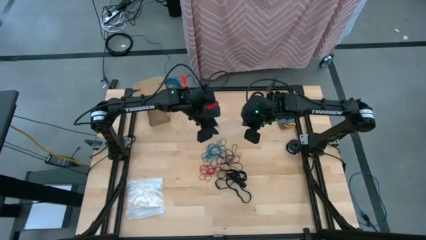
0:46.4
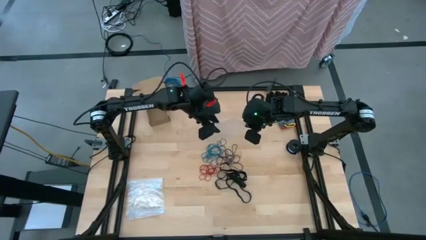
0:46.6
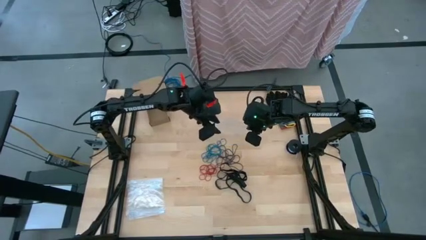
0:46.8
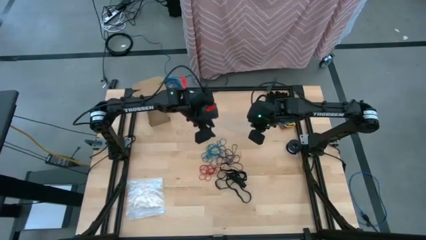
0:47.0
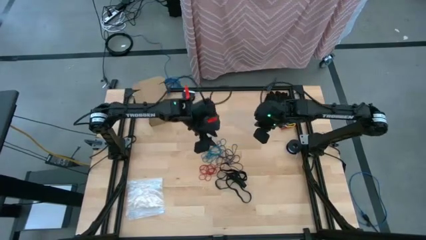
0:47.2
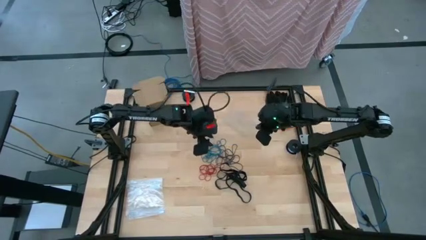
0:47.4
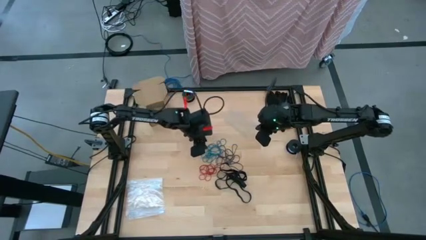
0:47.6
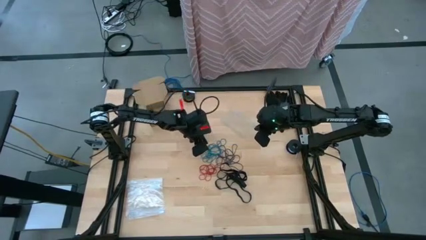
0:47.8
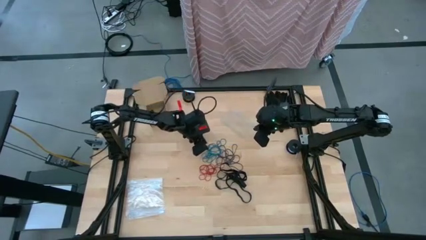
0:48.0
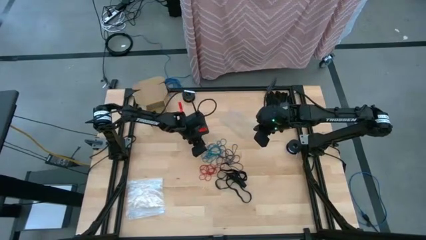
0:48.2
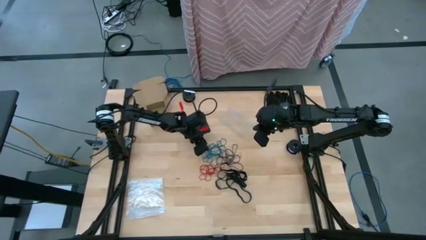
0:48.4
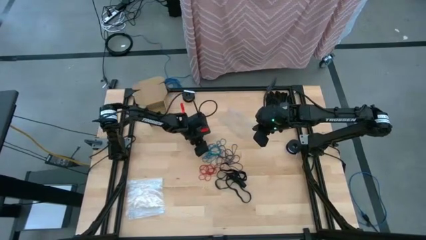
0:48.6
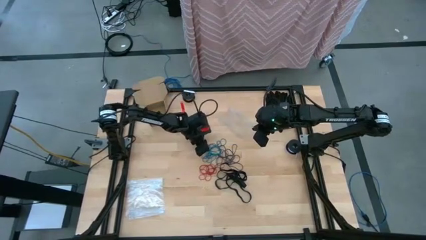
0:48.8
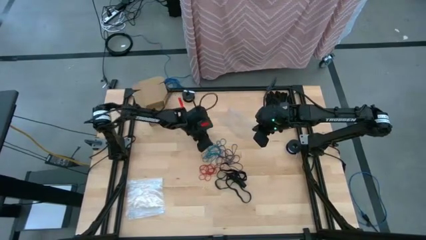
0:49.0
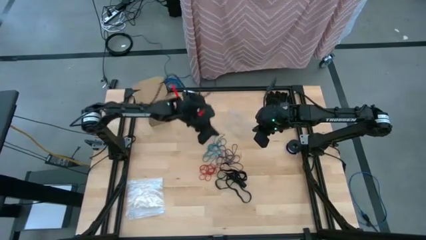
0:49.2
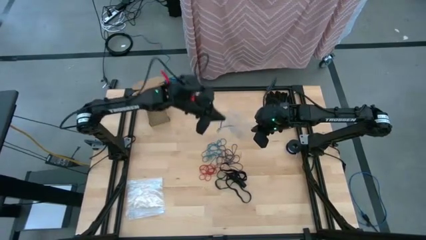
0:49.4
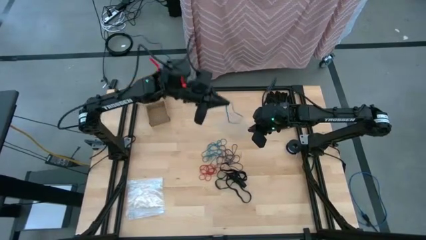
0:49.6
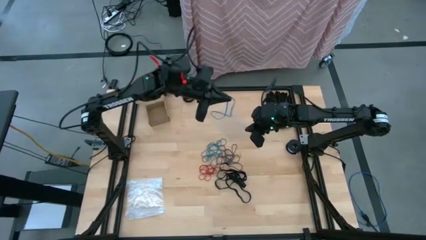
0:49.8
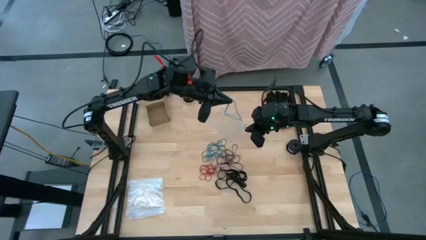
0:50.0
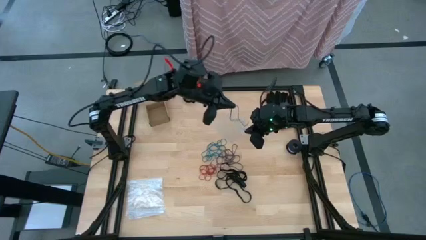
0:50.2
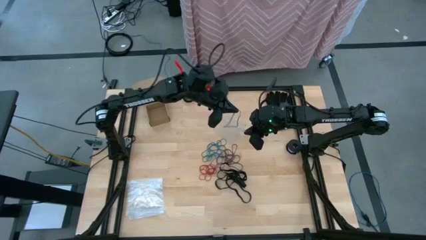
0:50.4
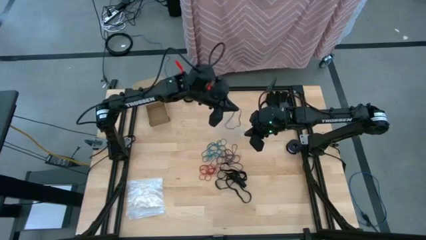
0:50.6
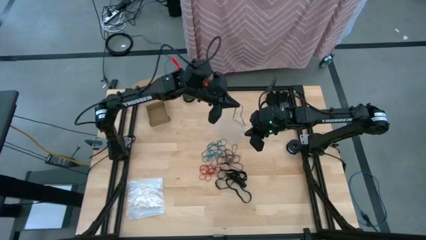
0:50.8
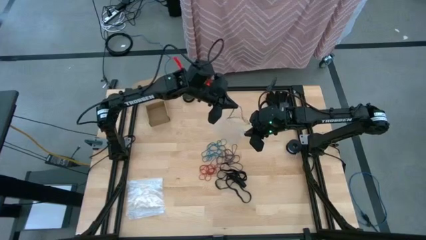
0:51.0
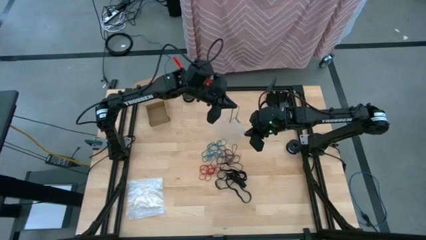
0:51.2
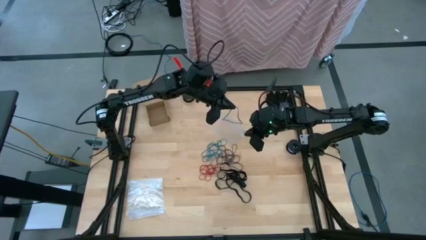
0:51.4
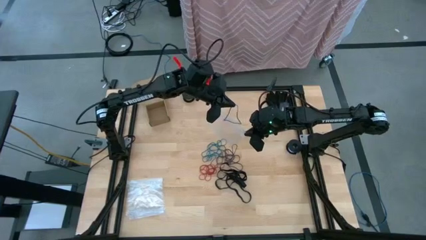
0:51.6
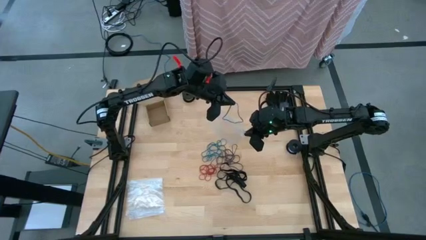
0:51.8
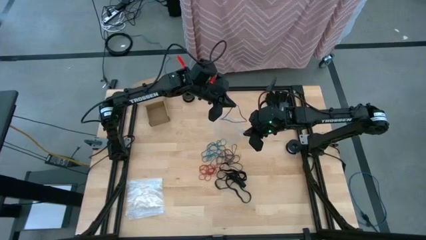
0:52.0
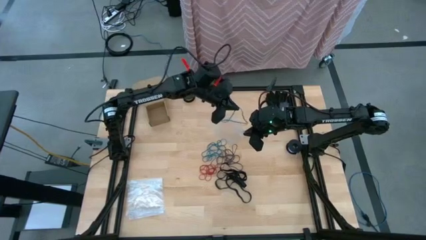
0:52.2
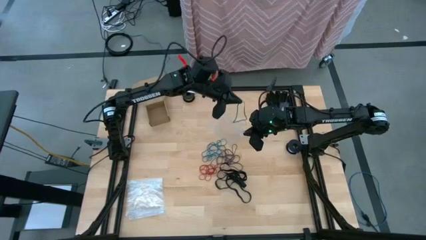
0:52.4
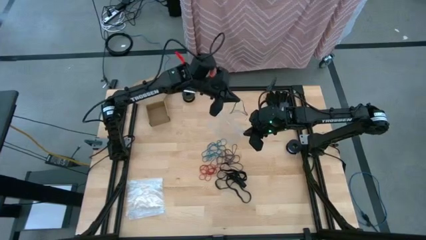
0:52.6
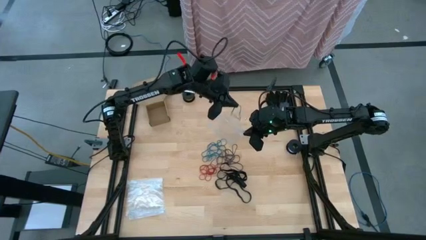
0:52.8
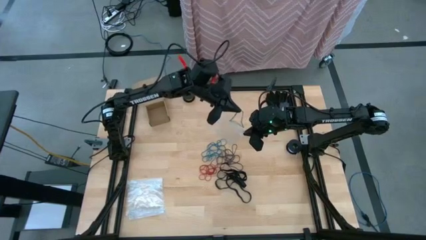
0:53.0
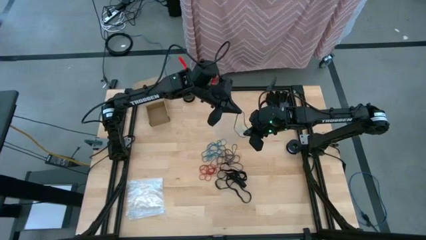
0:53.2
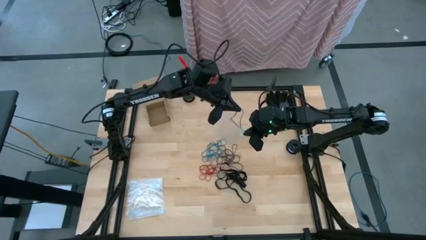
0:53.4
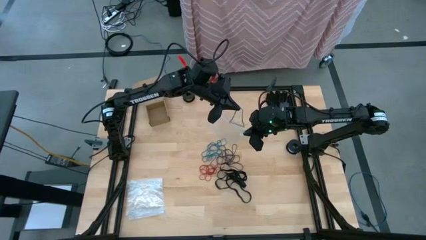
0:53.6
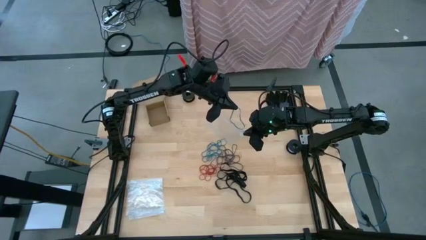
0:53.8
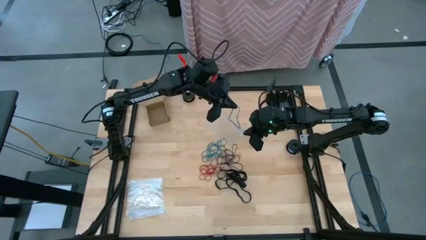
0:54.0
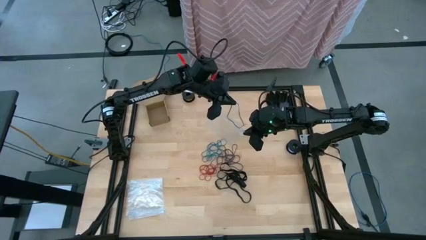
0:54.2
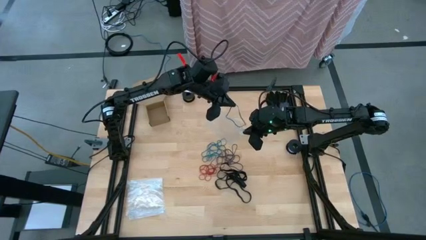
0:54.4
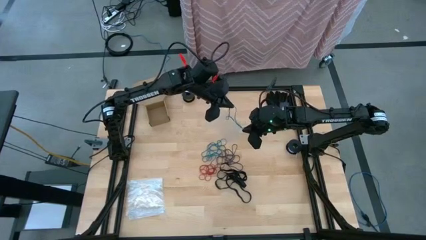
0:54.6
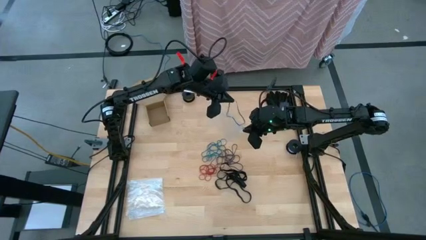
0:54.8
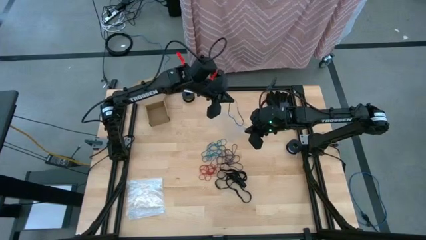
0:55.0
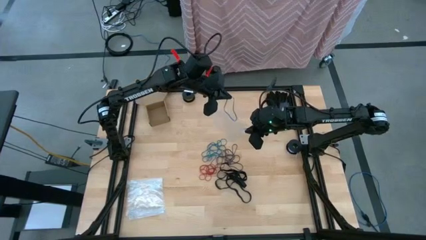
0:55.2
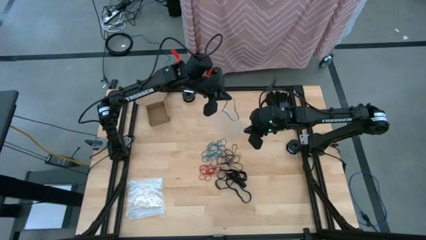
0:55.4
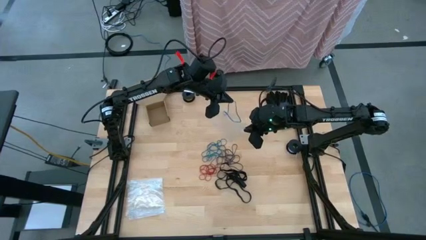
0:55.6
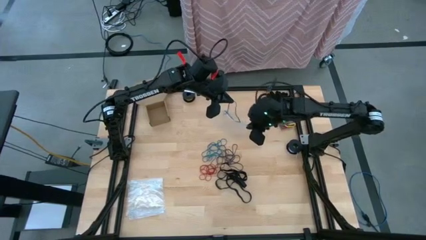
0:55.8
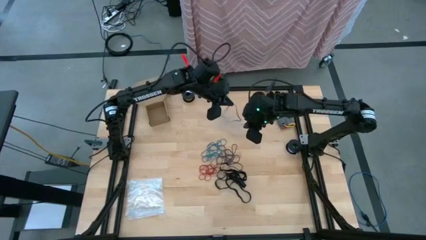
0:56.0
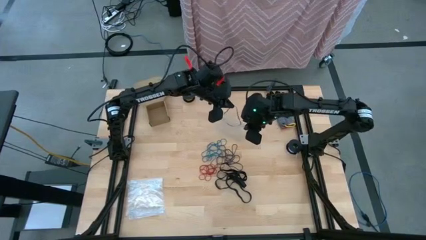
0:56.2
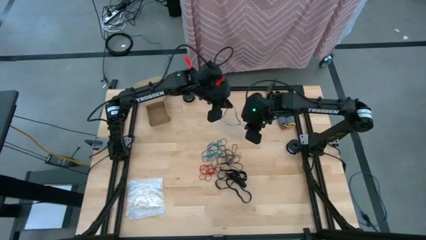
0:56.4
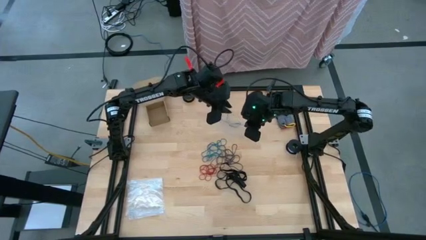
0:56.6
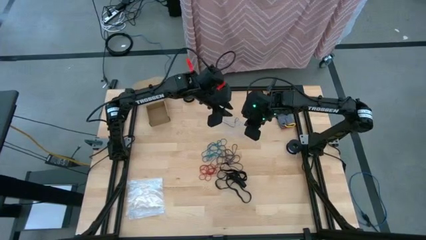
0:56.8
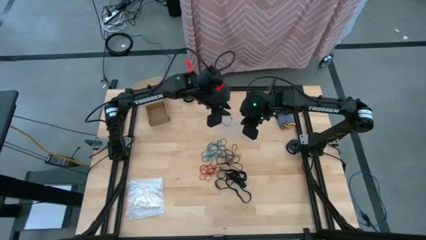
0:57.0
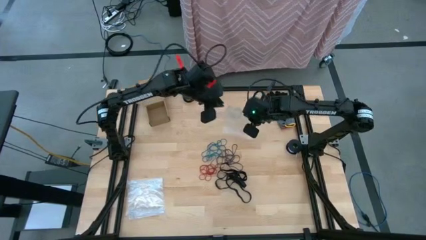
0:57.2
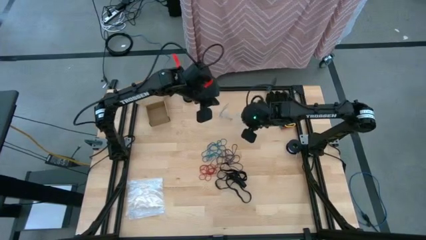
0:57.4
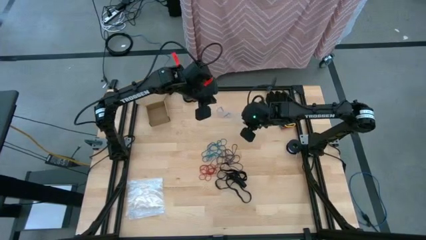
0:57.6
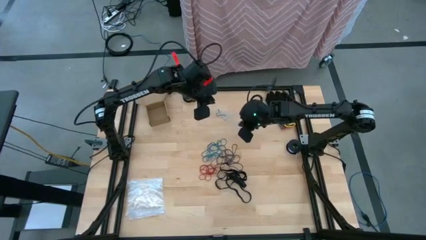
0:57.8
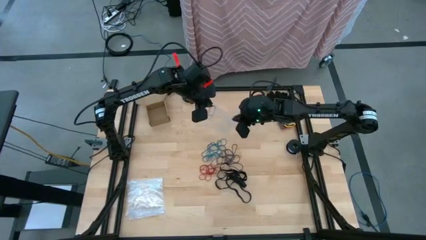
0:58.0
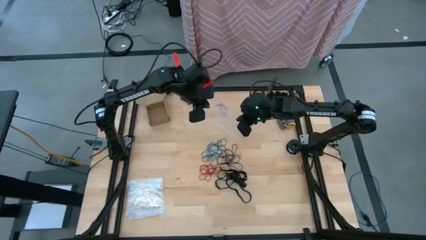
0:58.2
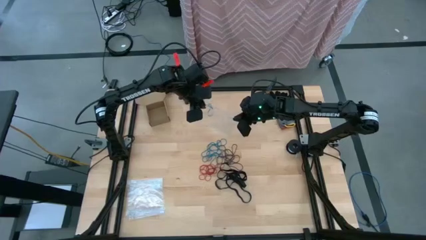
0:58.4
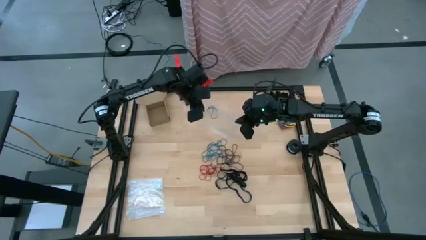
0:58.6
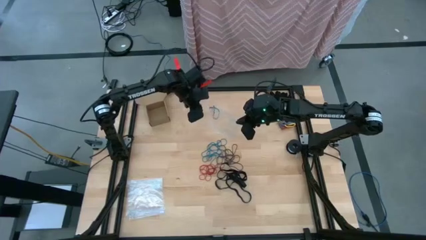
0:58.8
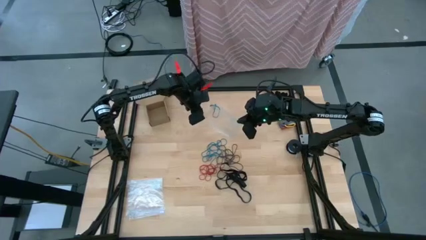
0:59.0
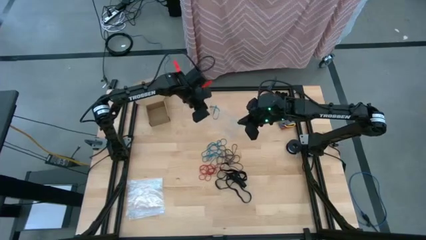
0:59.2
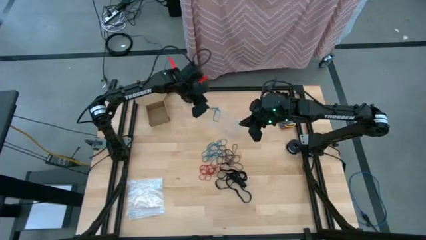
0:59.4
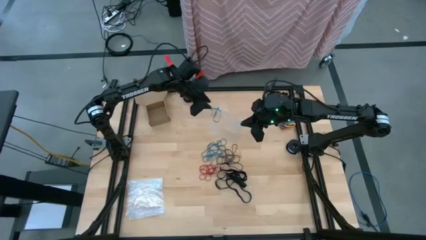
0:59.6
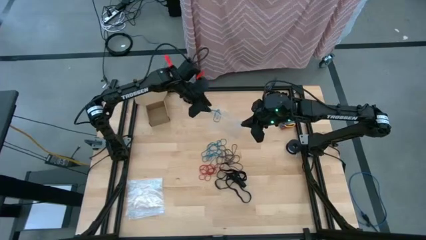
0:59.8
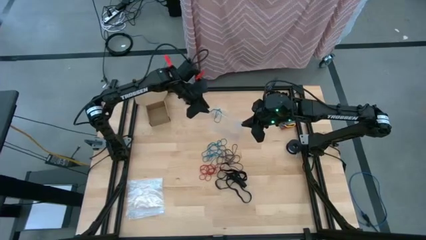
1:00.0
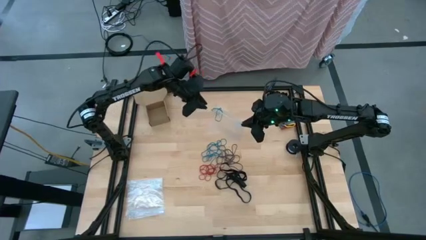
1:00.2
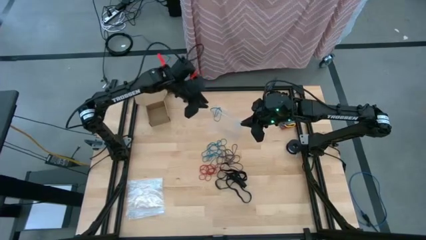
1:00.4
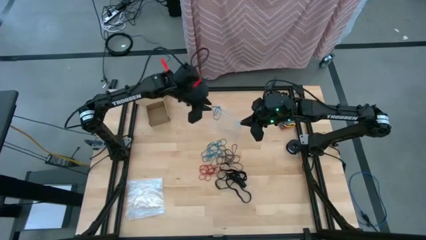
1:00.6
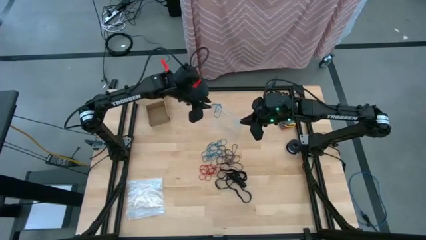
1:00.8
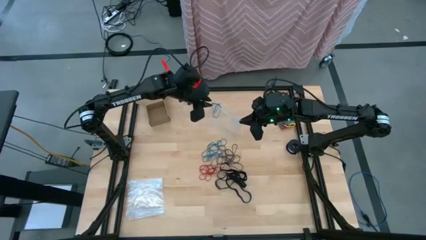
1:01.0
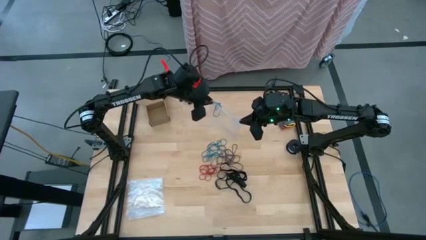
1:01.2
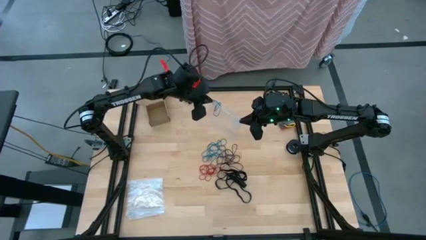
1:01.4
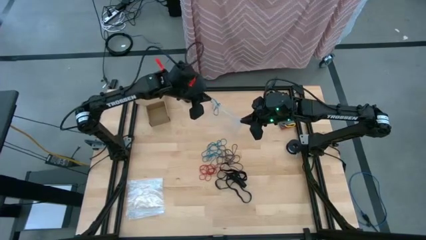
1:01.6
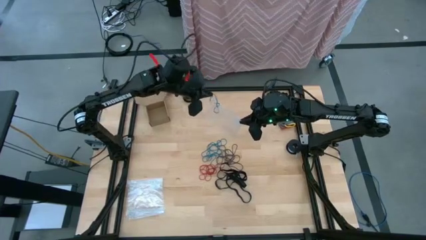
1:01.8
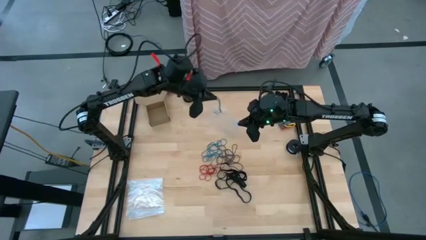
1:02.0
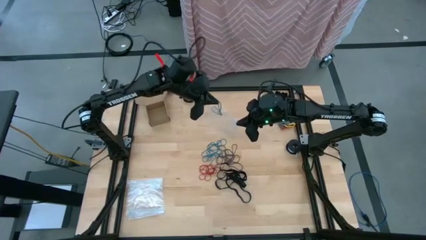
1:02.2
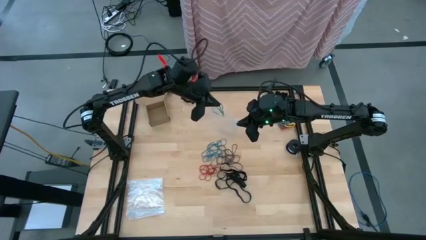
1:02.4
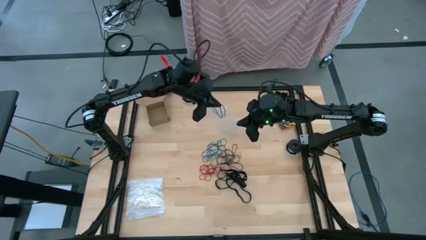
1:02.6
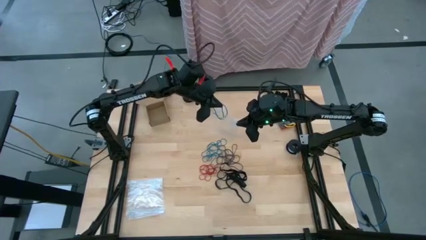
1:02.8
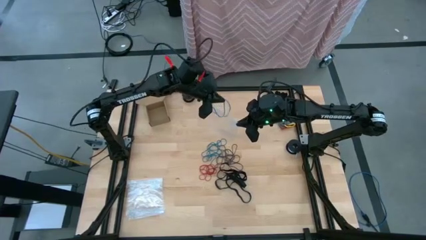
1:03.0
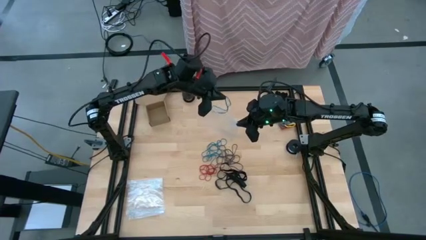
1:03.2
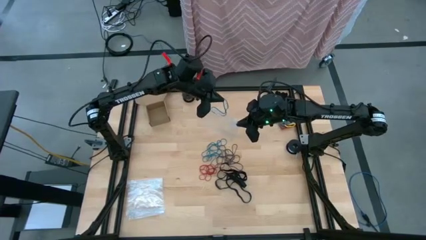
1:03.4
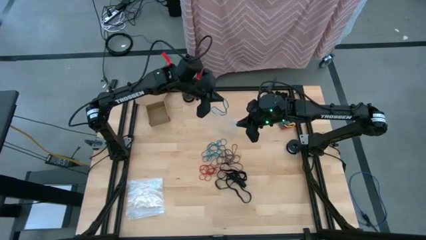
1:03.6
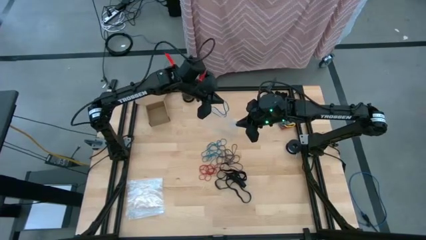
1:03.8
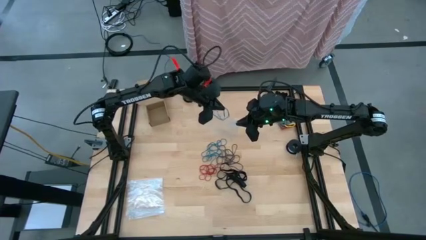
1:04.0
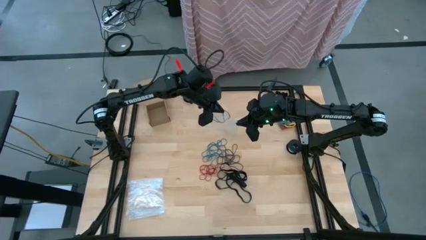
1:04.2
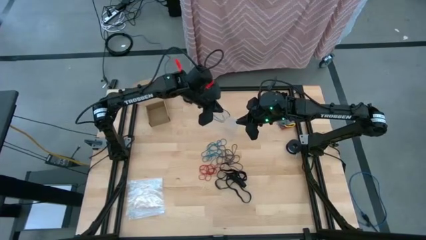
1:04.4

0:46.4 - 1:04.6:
Task: Sort rubber bands
Put the blue rubber band into the transparent zip bag
